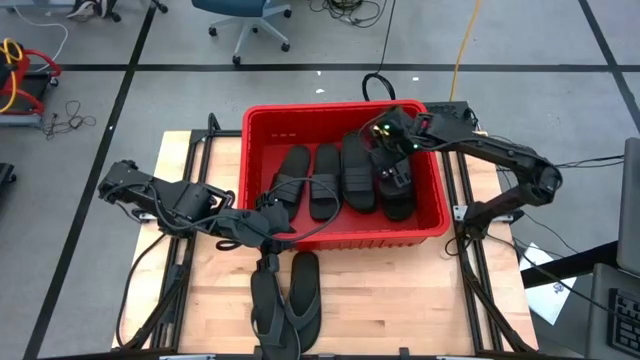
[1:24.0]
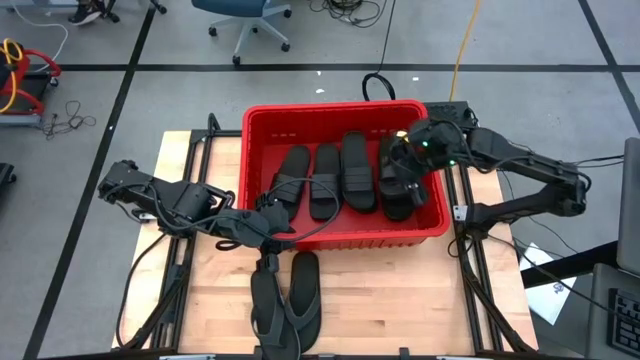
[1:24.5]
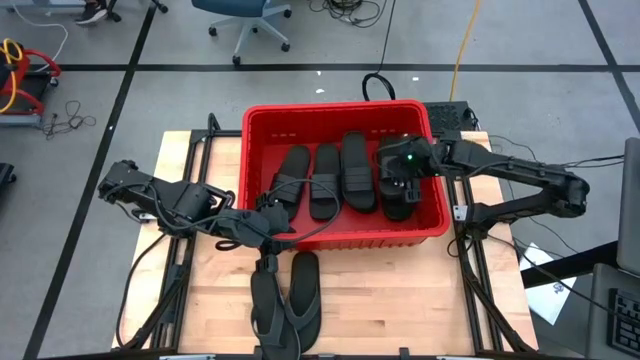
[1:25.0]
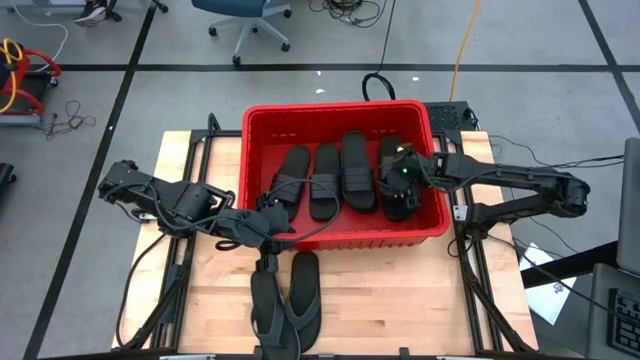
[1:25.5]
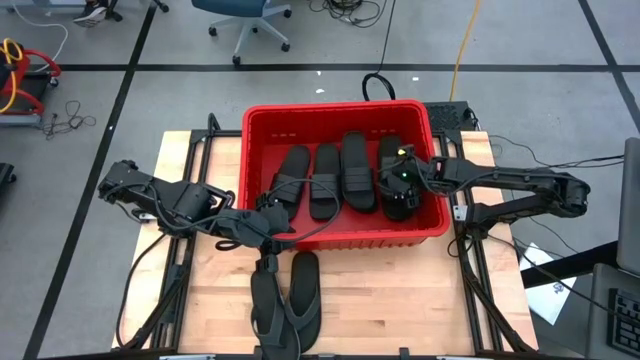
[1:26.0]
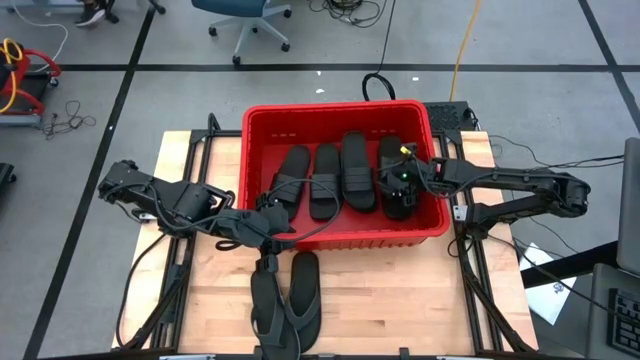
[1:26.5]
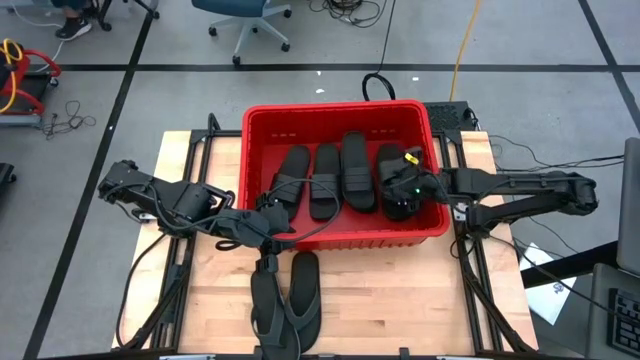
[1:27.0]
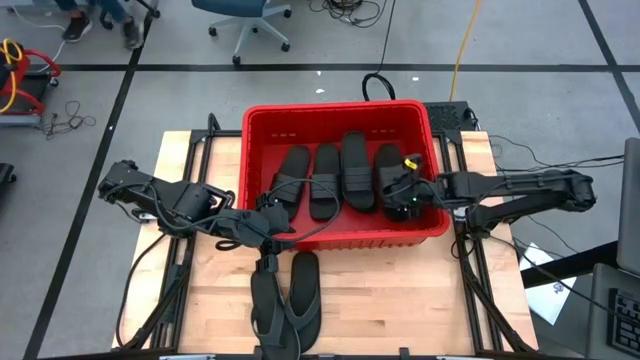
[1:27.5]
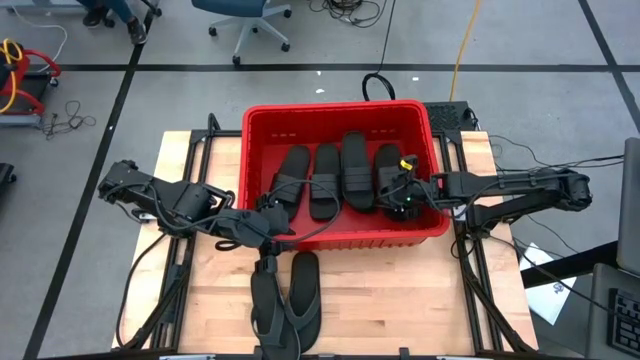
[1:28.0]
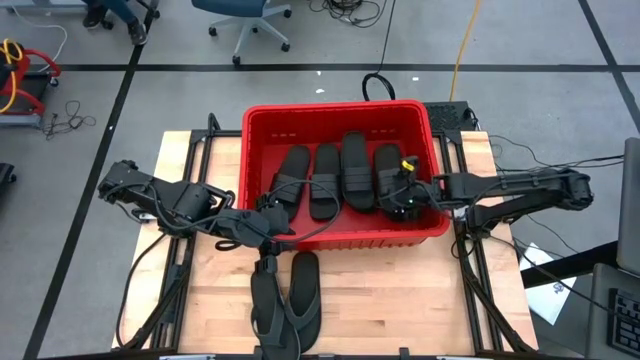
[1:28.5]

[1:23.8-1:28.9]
Task: Pick and place slides into bin
Adjust the black slide in the red bin

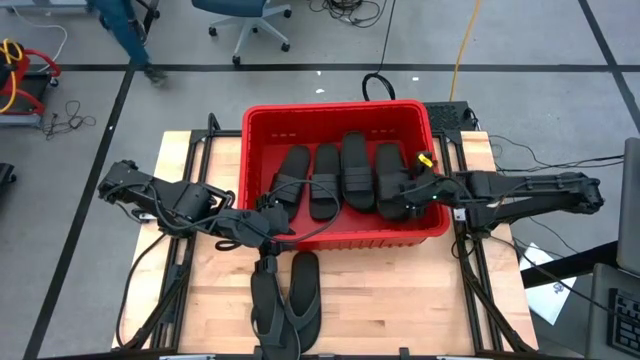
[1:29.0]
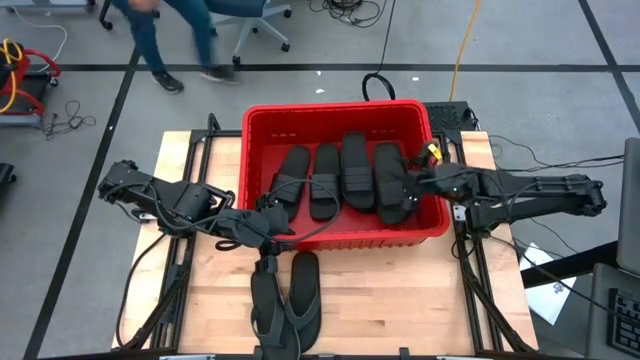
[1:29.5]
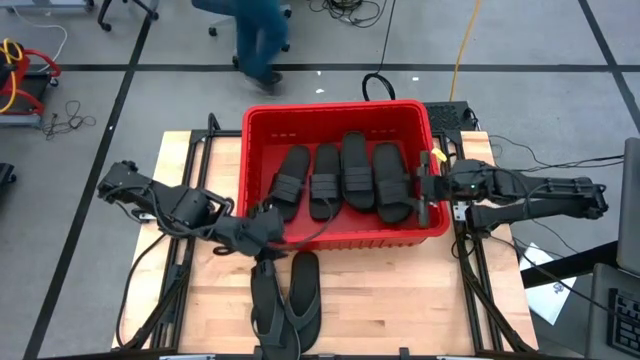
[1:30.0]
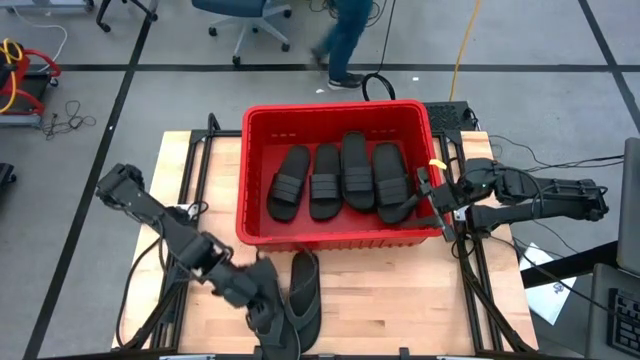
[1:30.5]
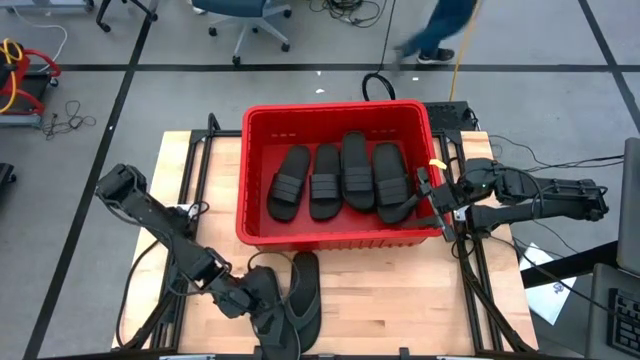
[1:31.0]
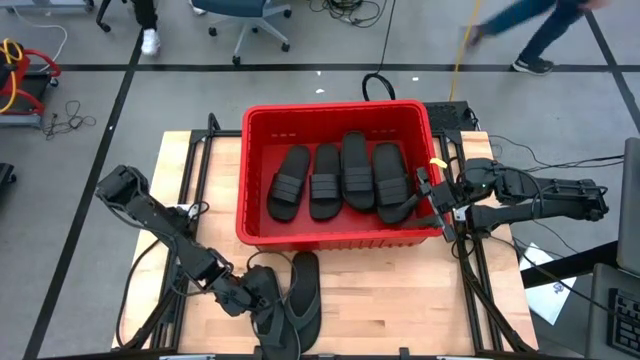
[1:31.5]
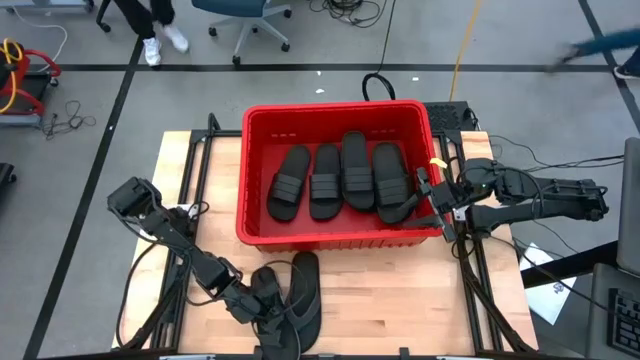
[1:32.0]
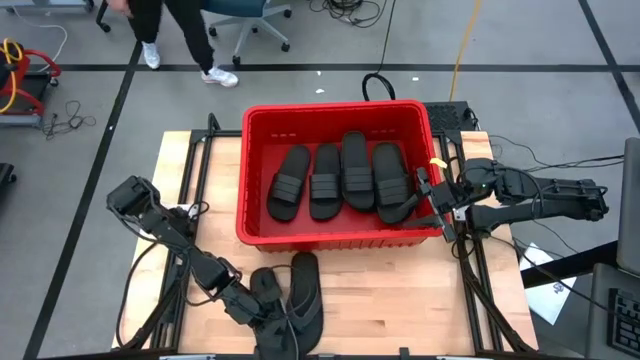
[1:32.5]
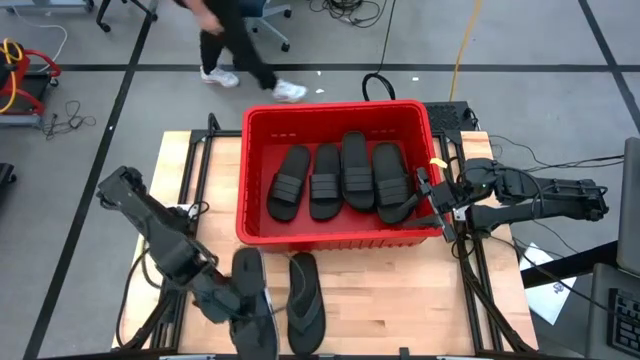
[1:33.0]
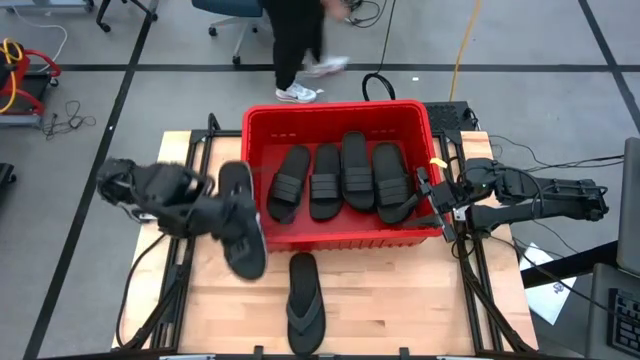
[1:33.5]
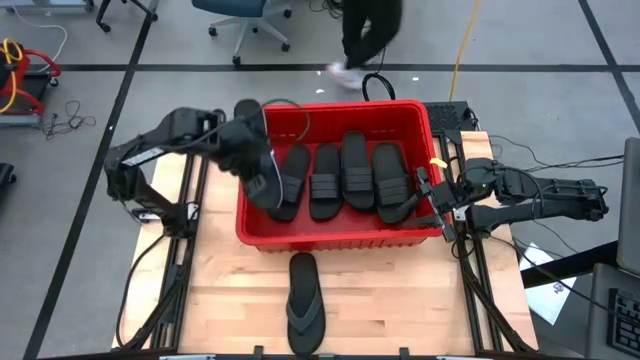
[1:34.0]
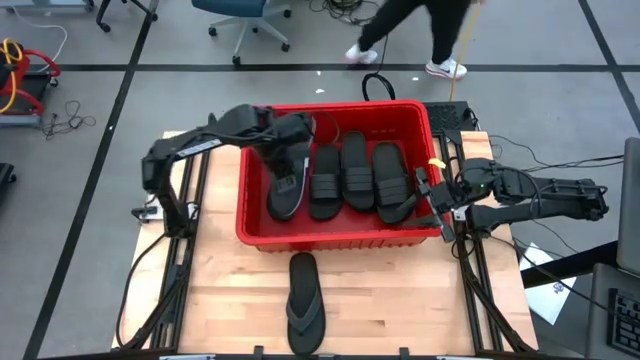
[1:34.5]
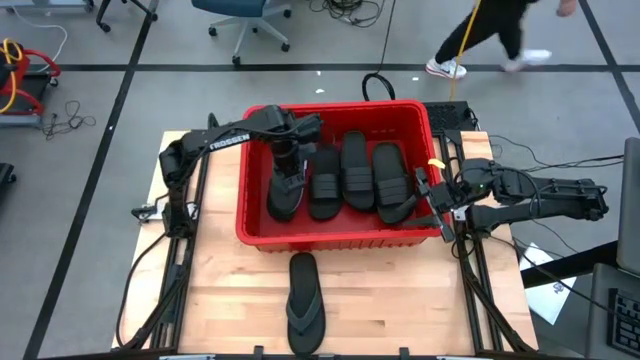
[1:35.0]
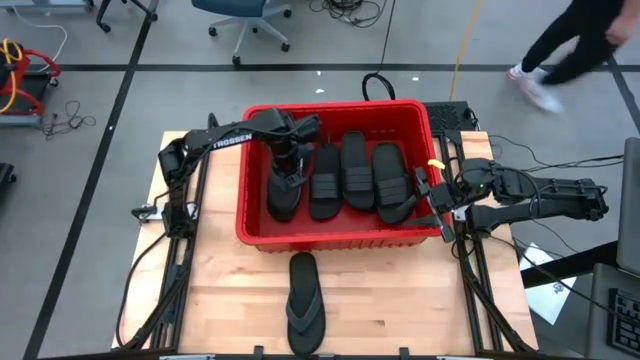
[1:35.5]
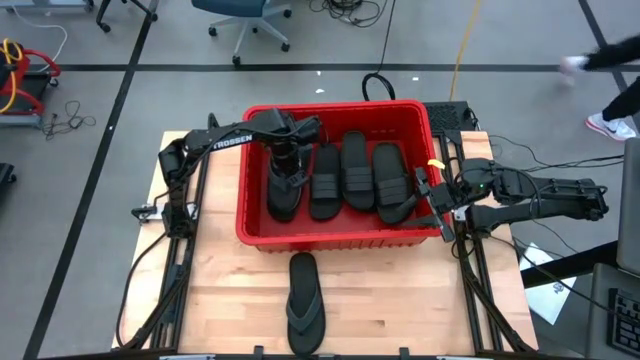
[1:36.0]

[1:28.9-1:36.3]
Put the black slipper into the red bin

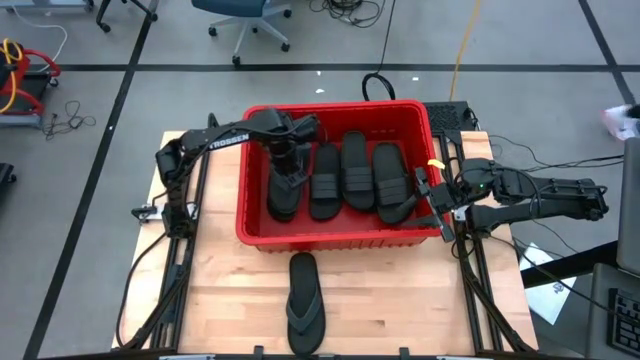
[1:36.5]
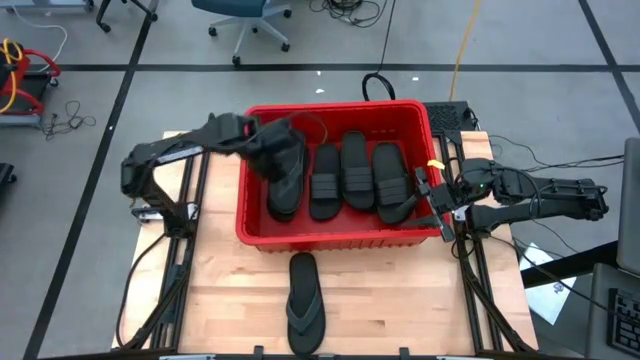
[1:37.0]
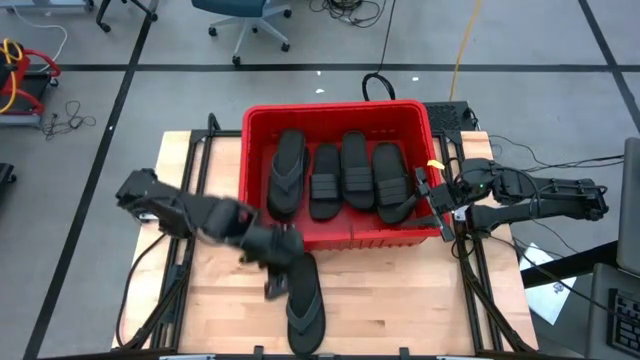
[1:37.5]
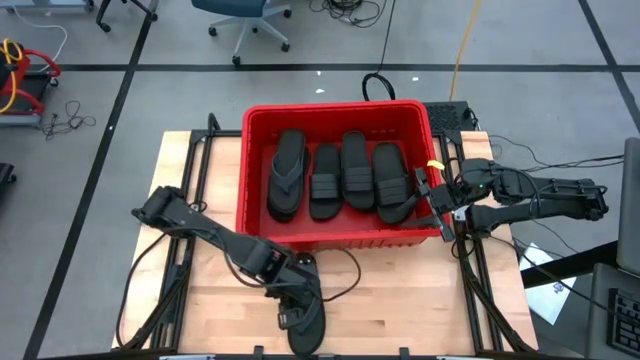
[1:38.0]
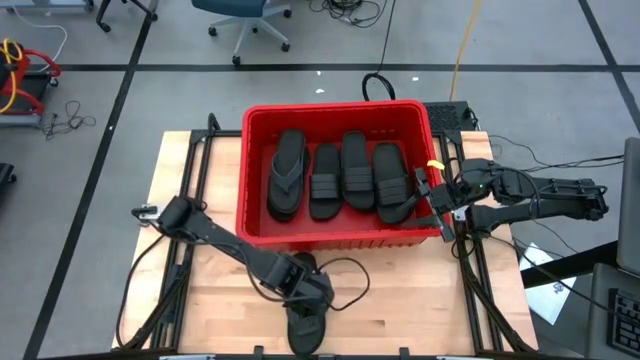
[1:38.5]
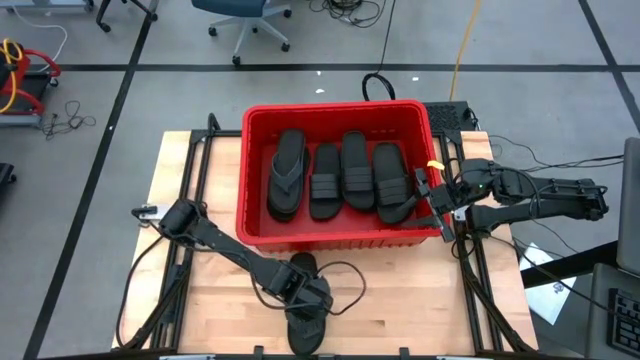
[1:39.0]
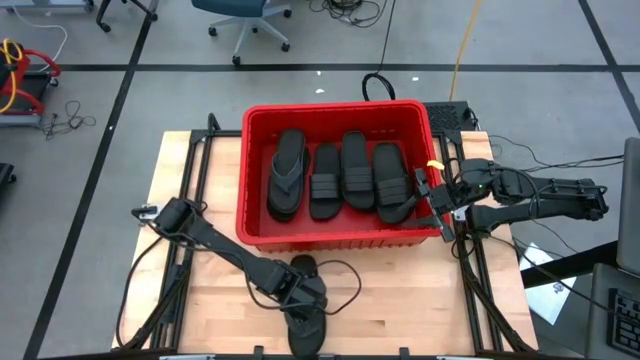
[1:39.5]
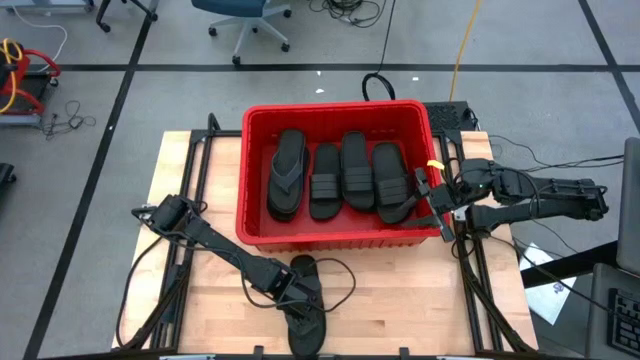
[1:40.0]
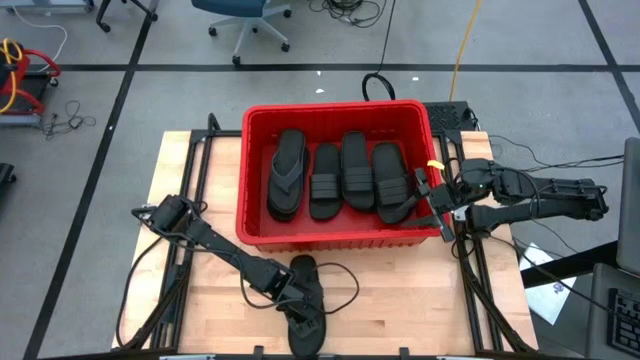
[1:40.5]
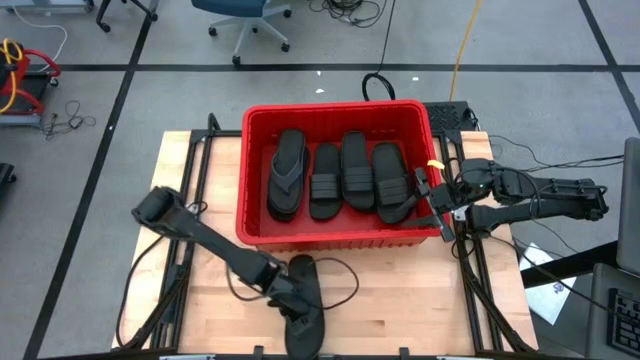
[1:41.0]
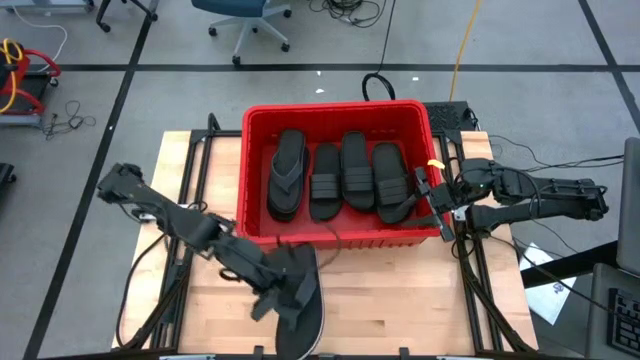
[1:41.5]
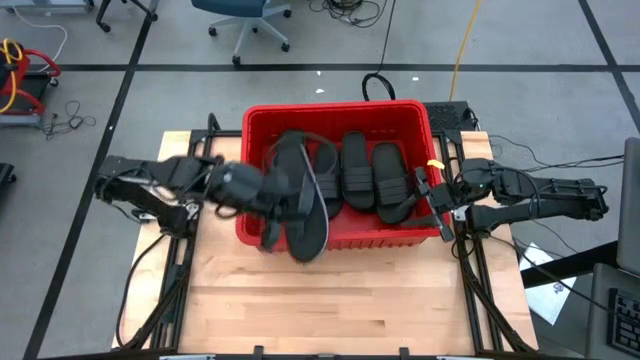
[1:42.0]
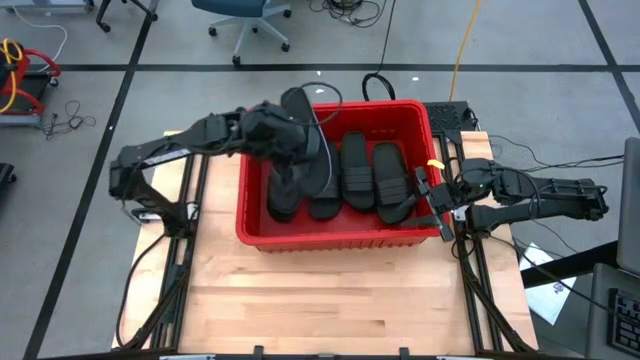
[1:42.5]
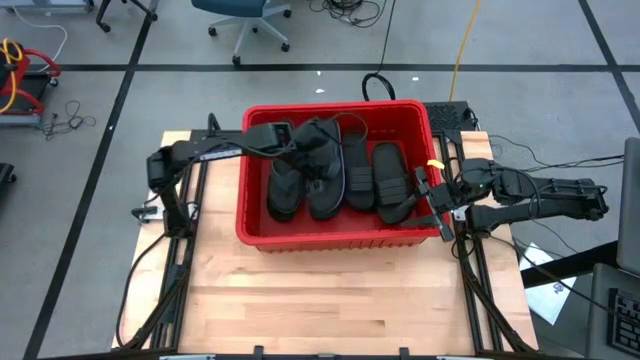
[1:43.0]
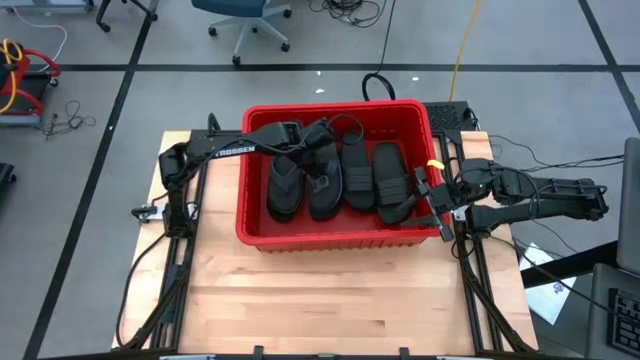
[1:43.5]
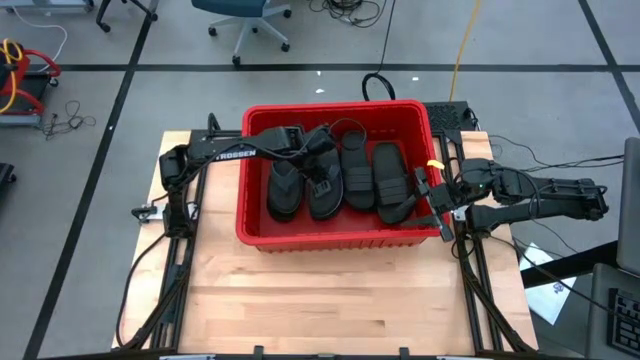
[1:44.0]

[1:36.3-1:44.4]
Put the black slipper into the red bin
